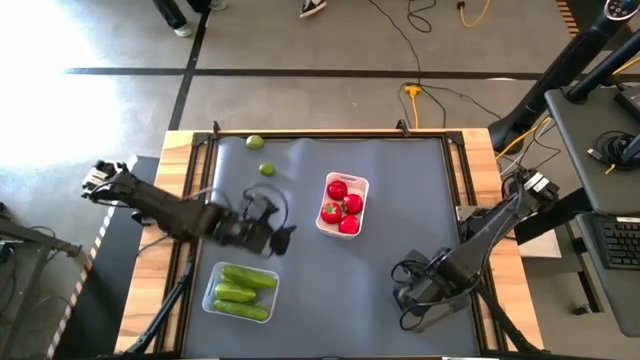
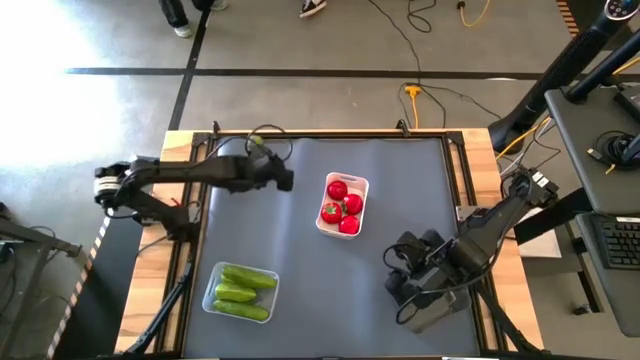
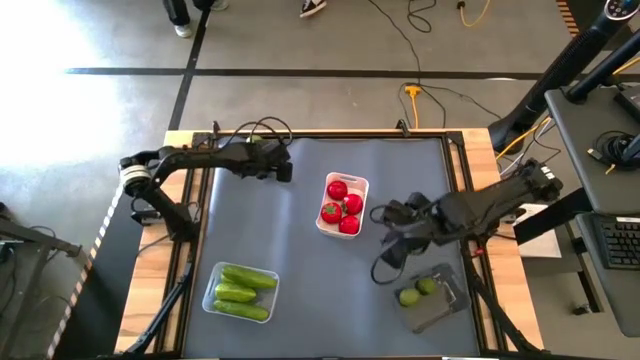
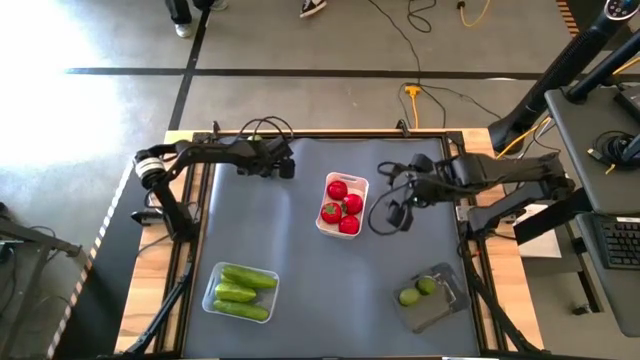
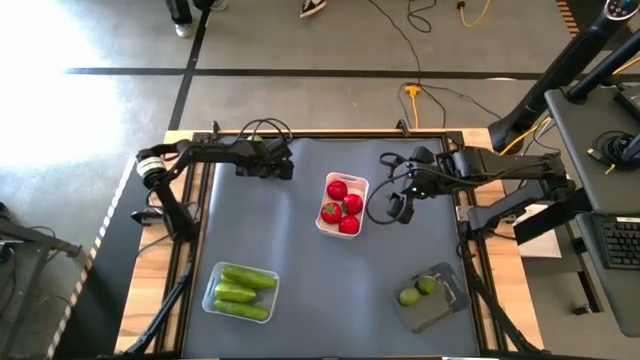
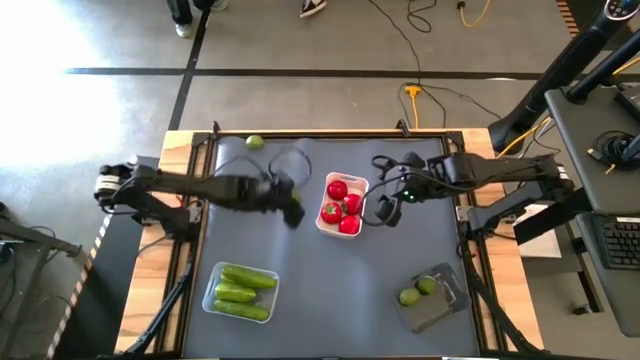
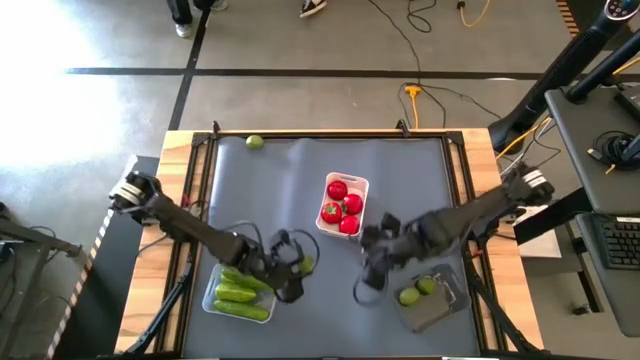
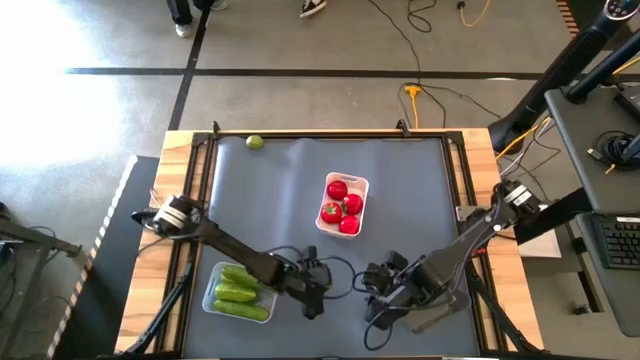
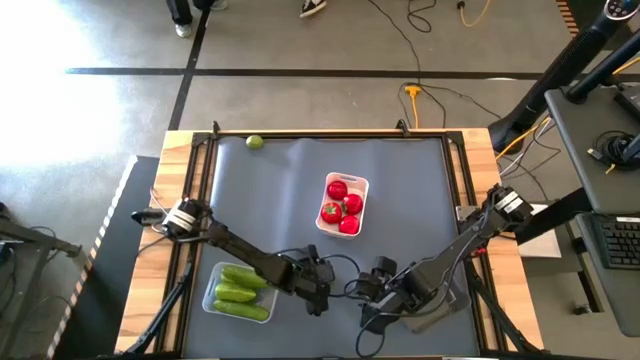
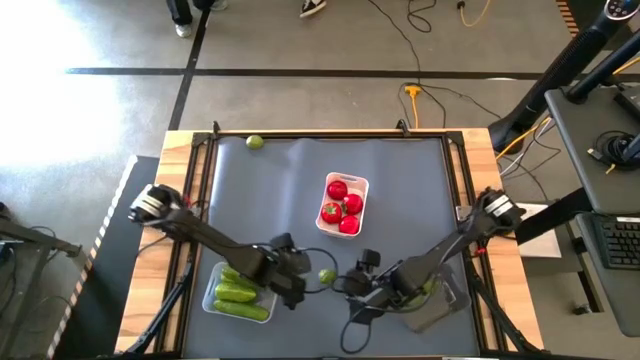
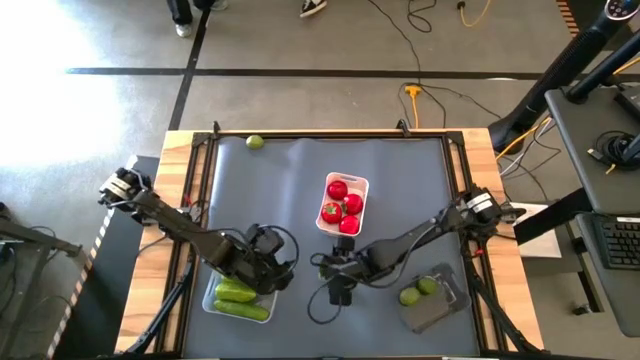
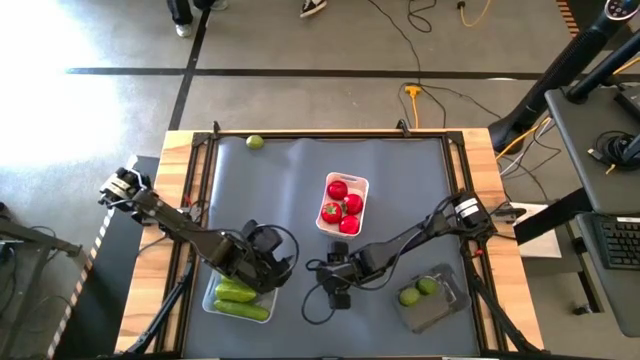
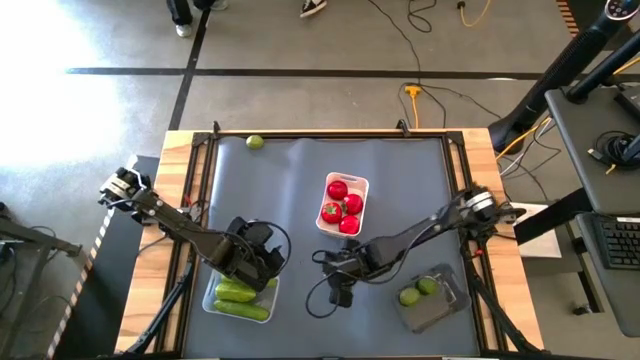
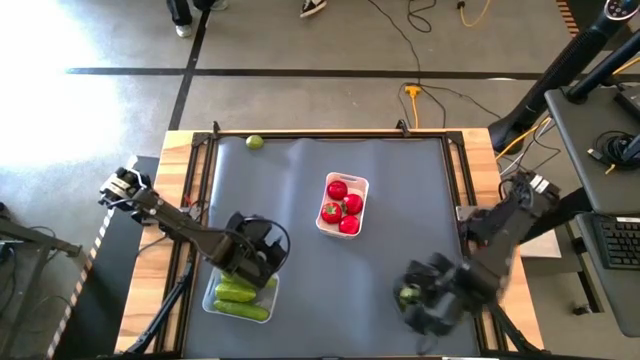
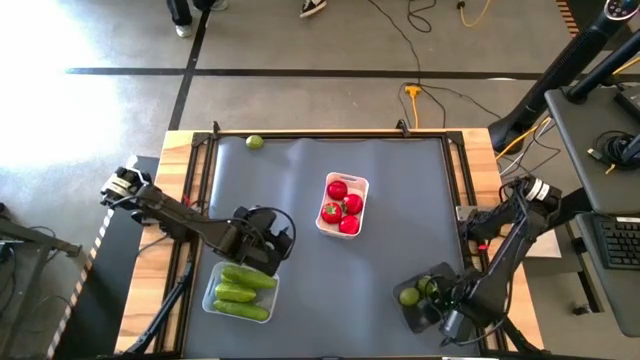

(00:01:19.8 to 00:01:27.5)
Task: Sort produce into baskets
Put the bottom lime into the black transparent bin

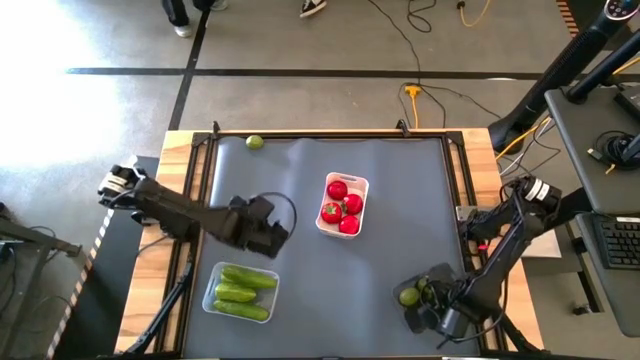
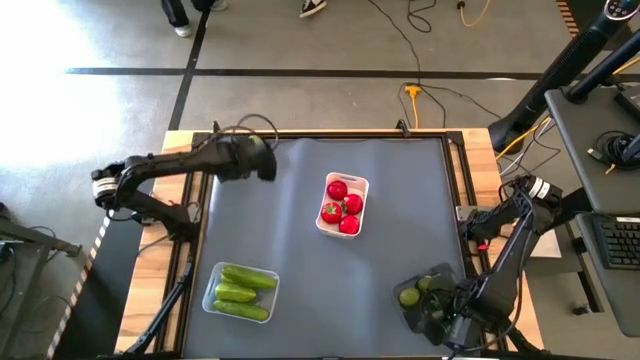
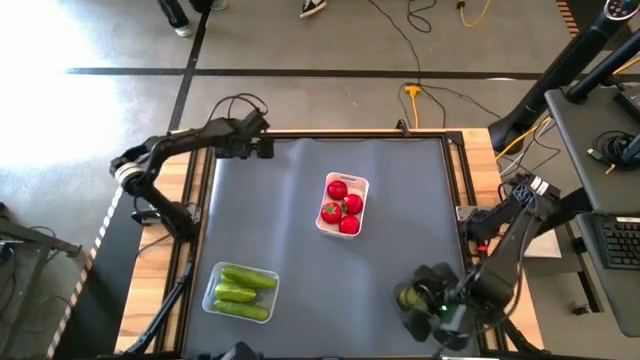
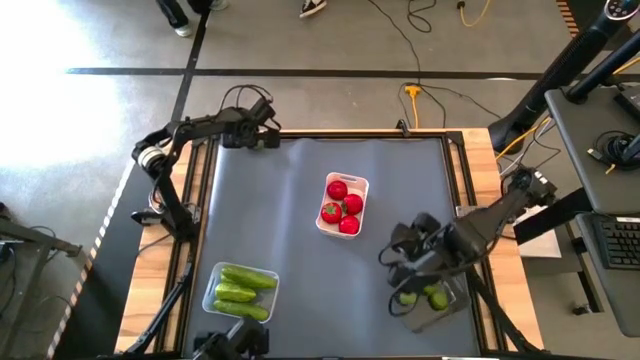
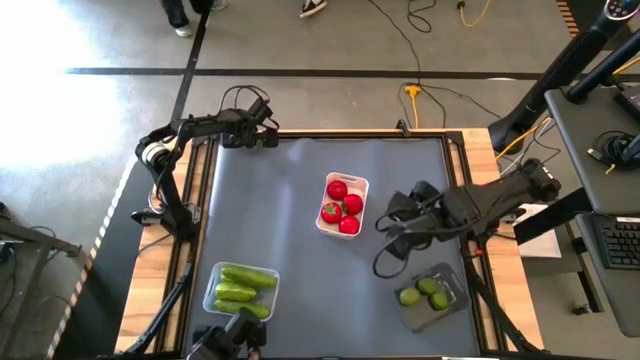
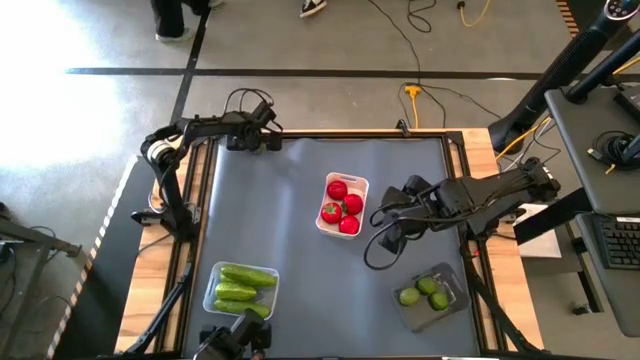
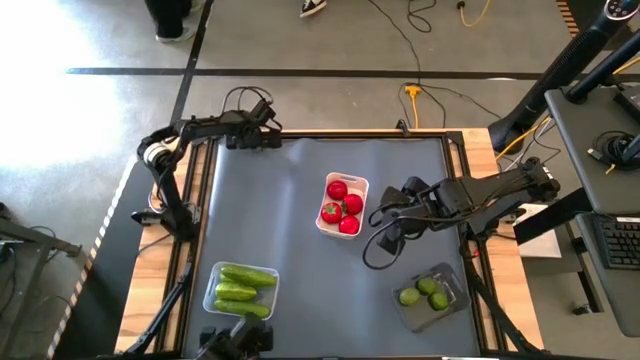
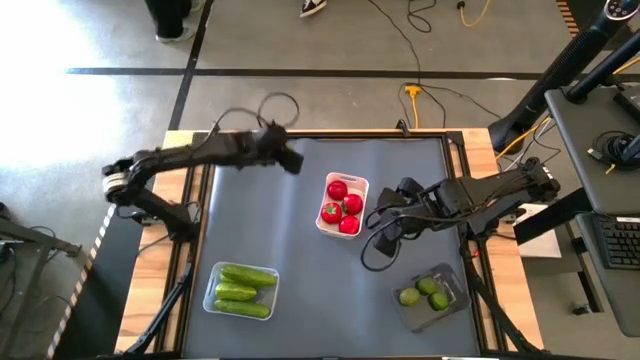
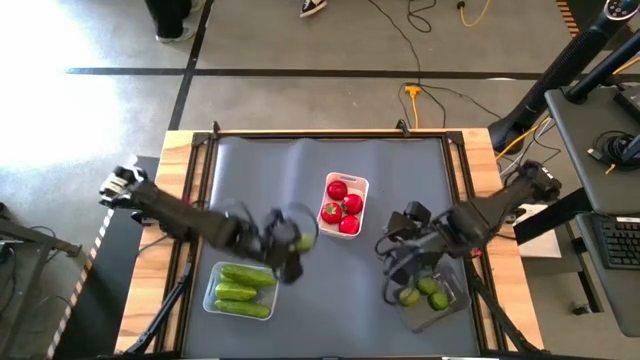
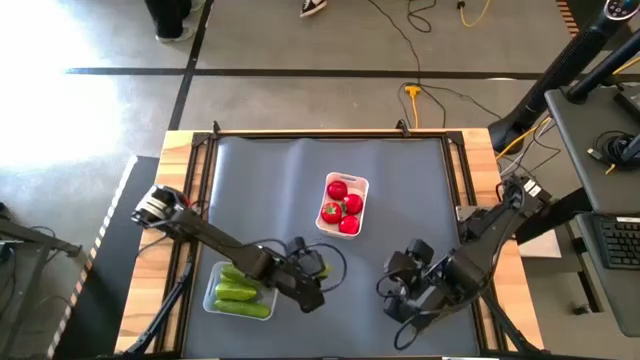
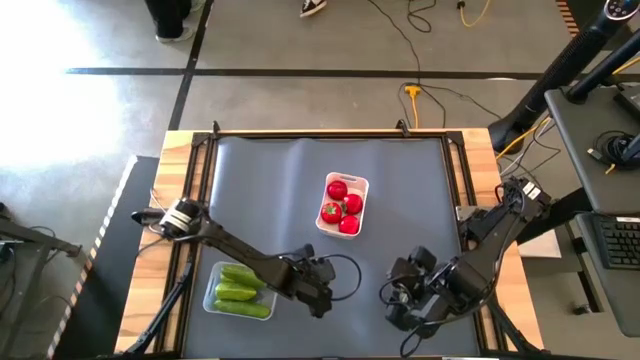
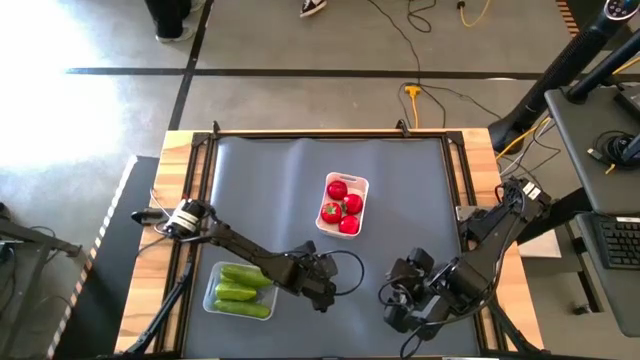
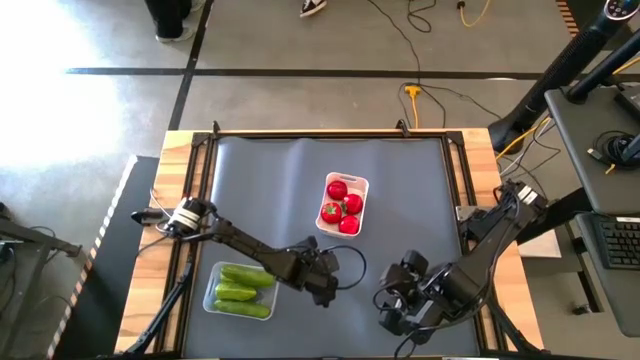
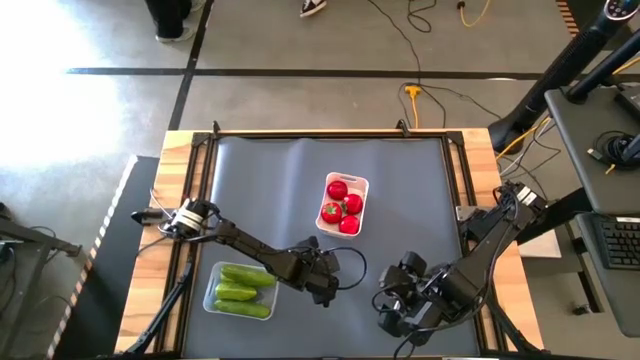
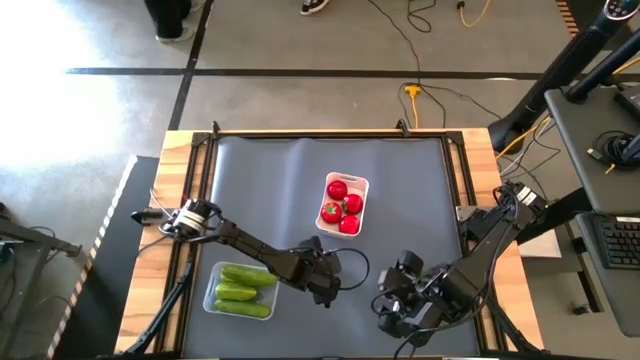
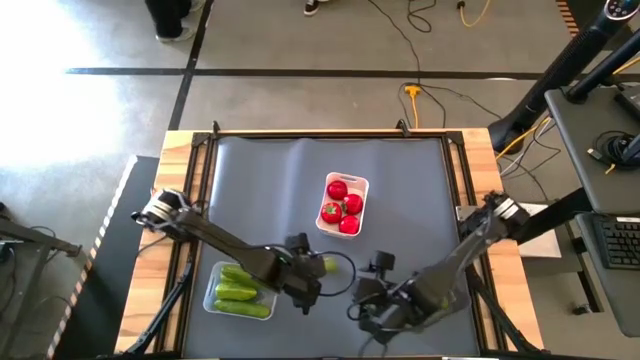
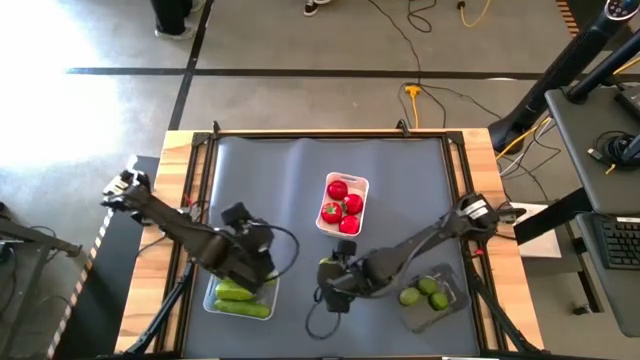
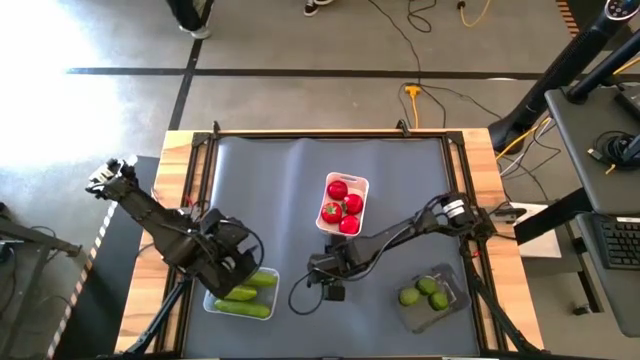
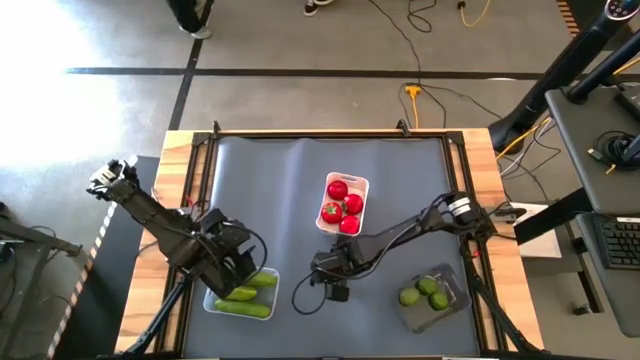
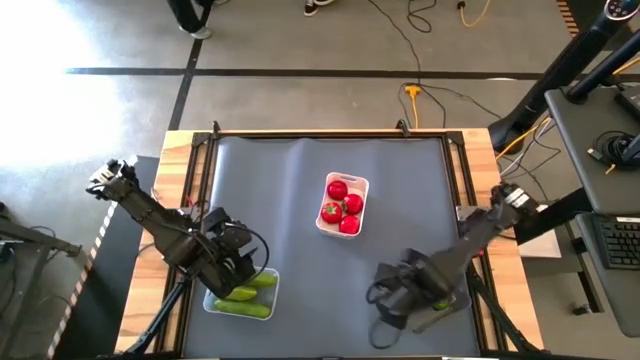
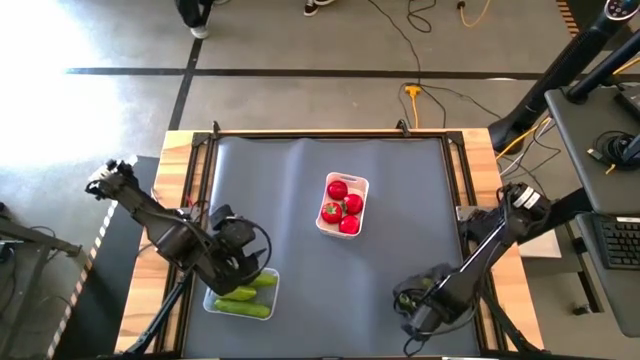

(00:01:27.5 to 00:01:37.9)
Put the lime into the black transparent bin

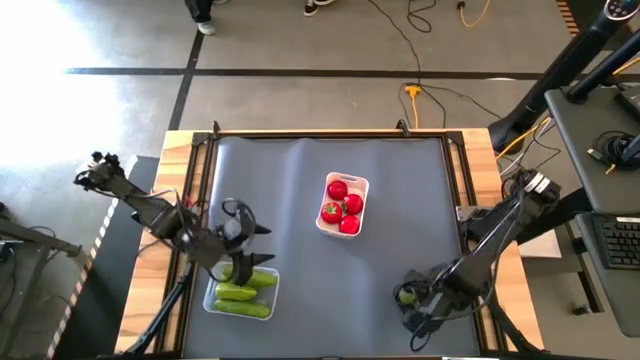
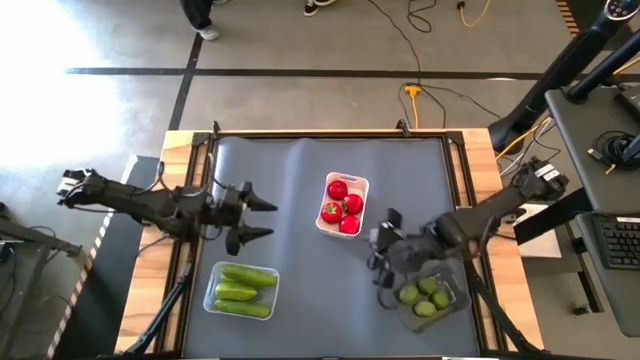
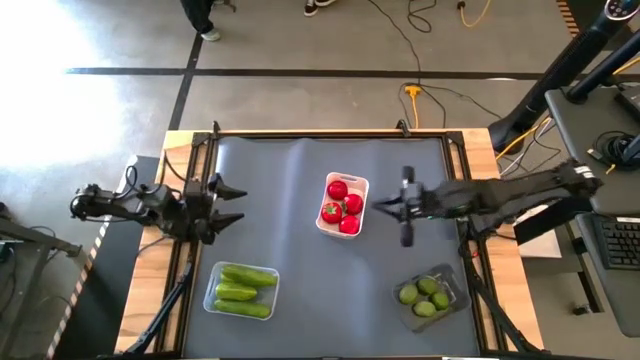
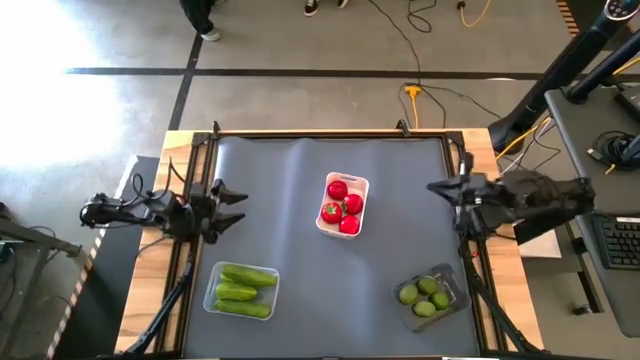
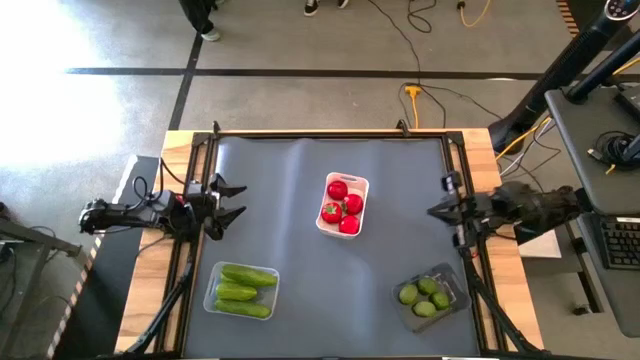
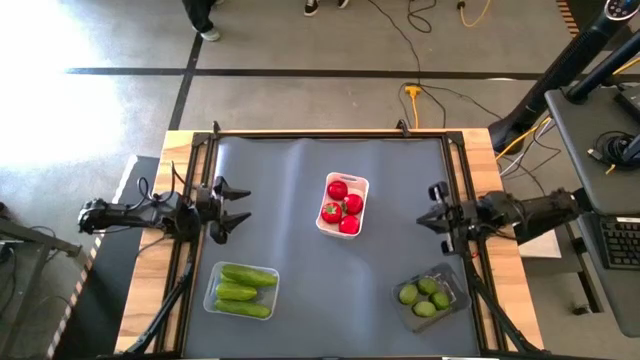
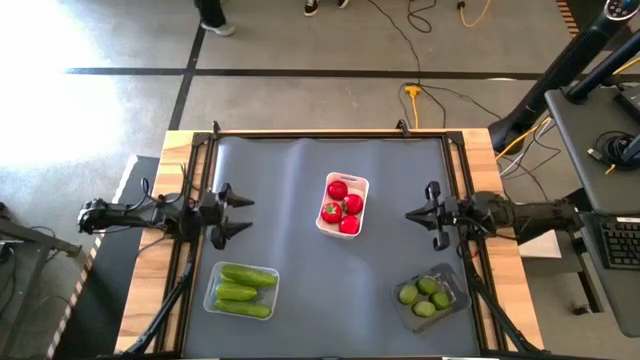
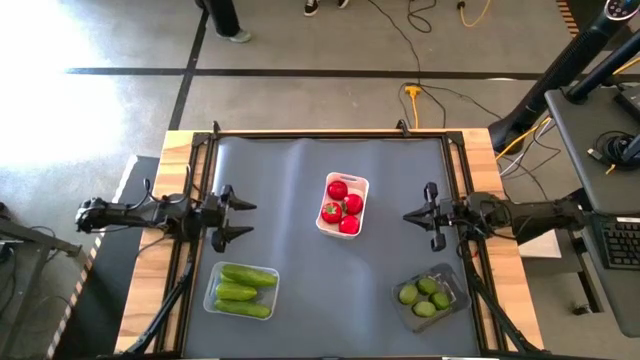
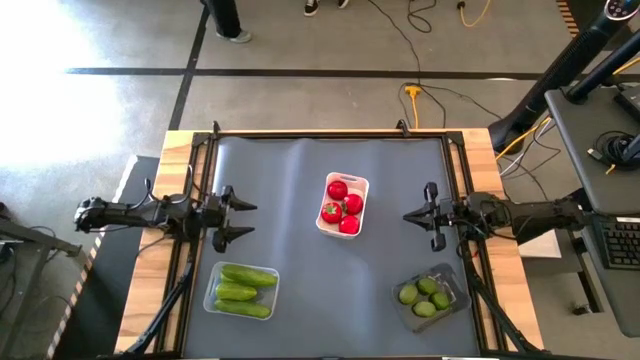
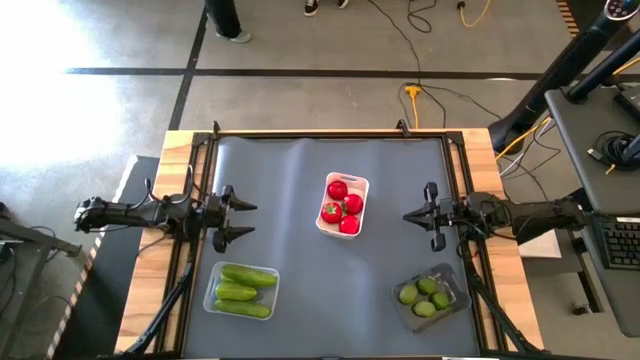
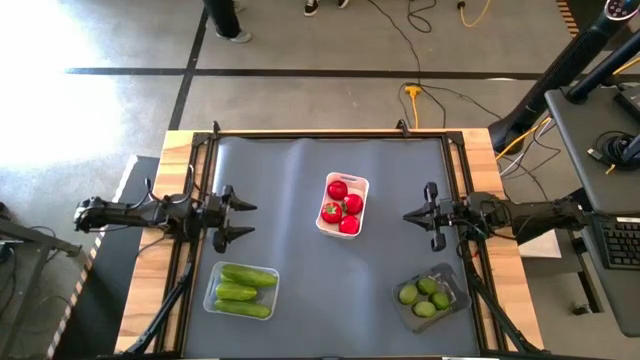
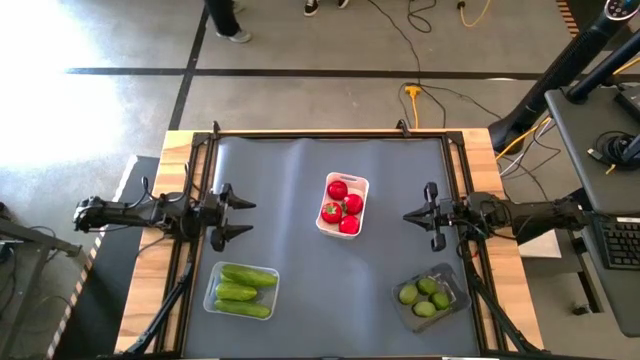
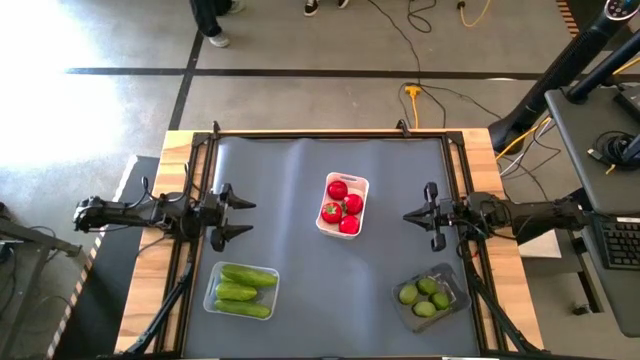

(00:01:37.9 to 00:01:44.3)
Return to Home Position
